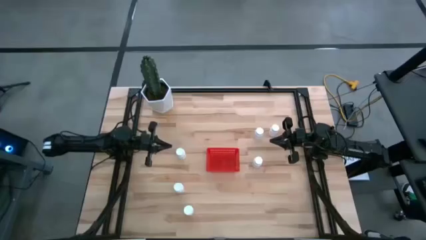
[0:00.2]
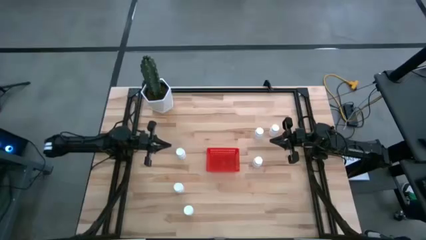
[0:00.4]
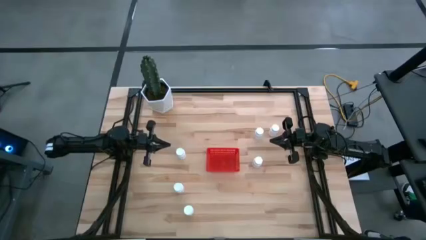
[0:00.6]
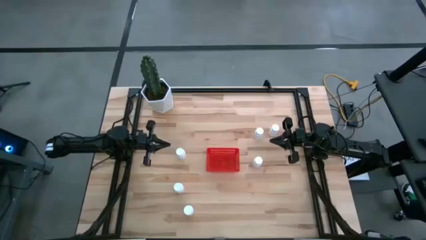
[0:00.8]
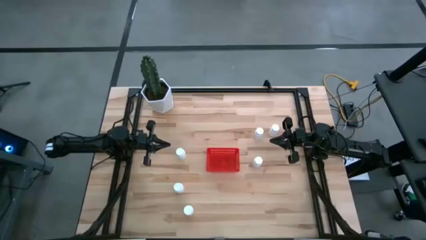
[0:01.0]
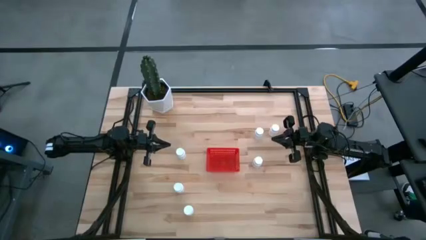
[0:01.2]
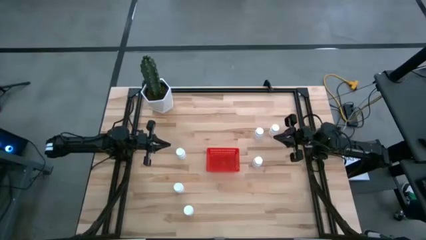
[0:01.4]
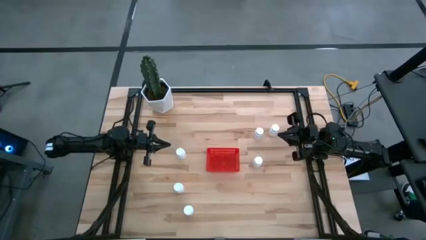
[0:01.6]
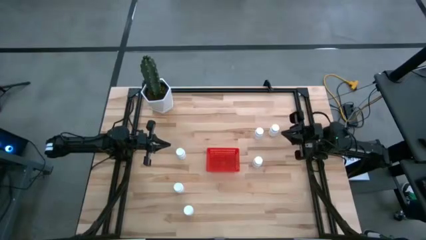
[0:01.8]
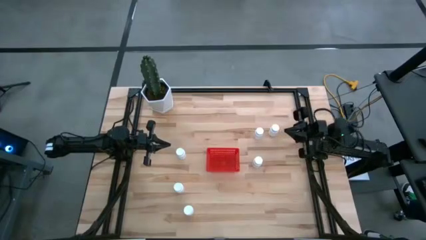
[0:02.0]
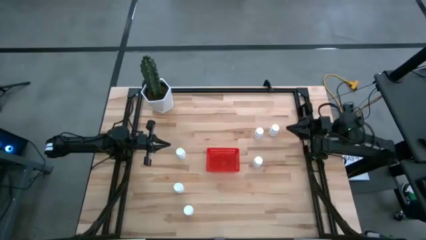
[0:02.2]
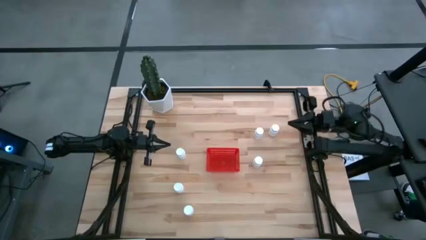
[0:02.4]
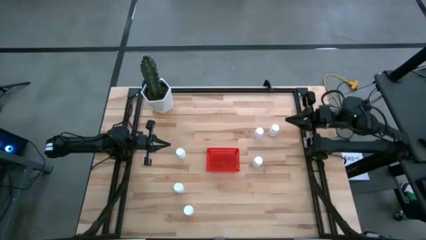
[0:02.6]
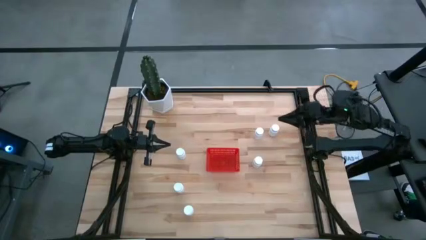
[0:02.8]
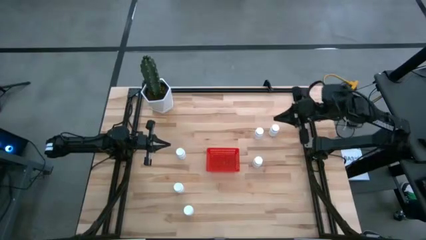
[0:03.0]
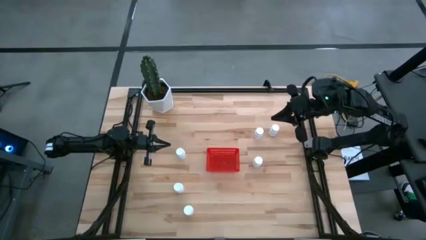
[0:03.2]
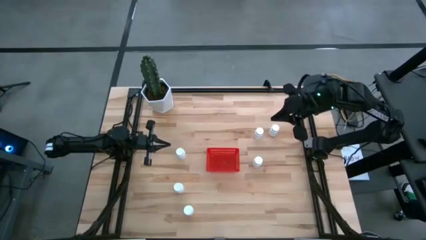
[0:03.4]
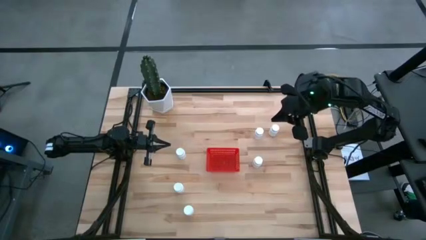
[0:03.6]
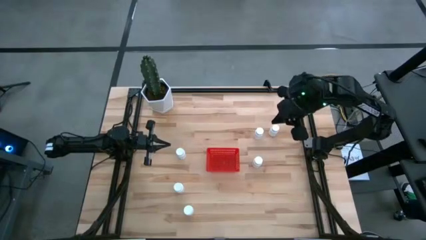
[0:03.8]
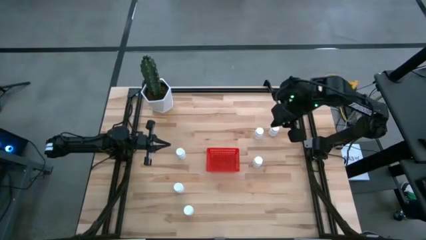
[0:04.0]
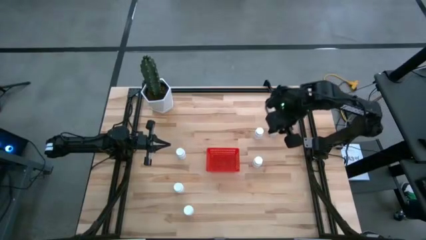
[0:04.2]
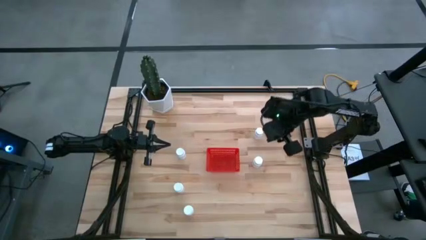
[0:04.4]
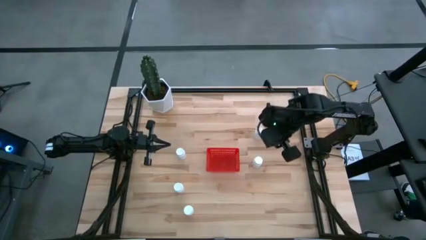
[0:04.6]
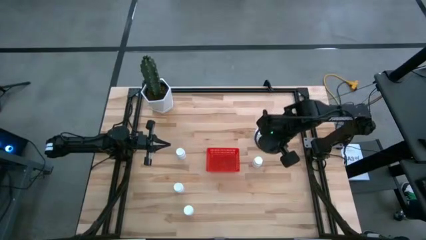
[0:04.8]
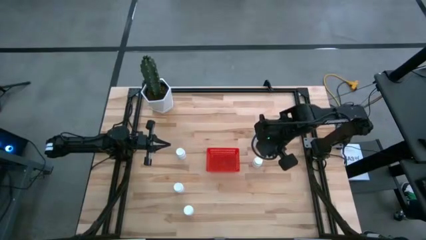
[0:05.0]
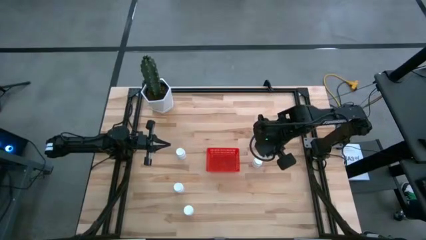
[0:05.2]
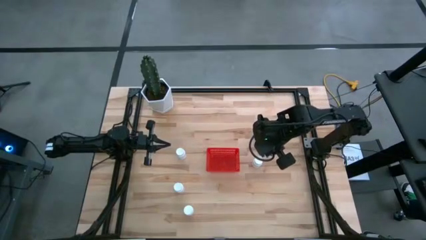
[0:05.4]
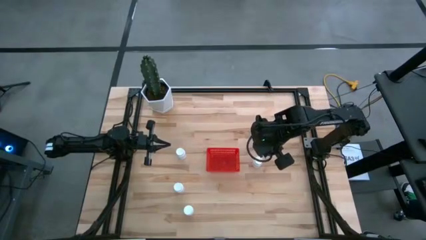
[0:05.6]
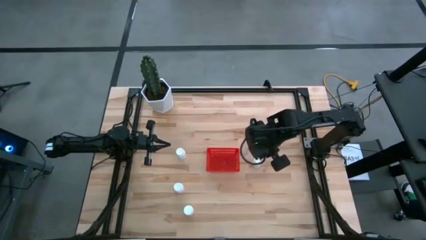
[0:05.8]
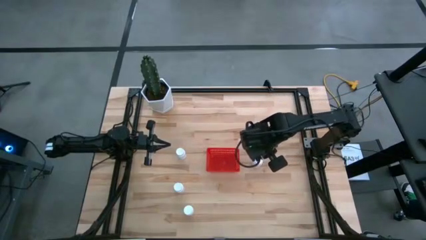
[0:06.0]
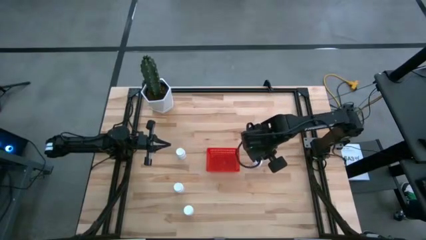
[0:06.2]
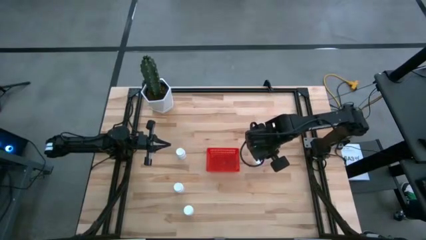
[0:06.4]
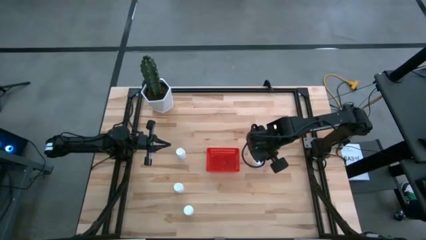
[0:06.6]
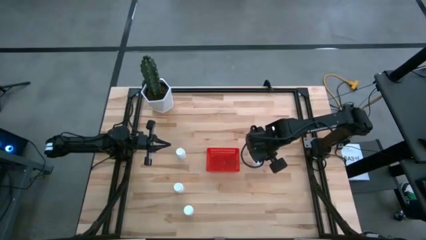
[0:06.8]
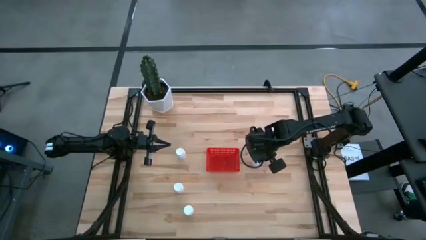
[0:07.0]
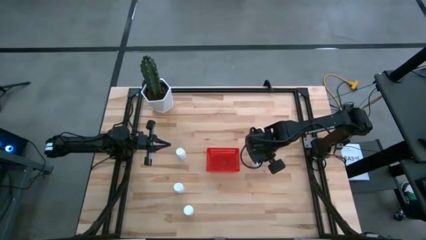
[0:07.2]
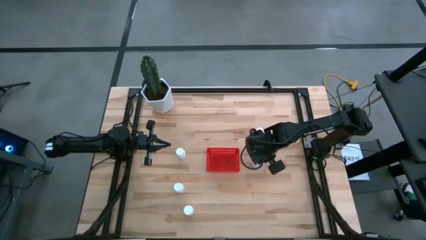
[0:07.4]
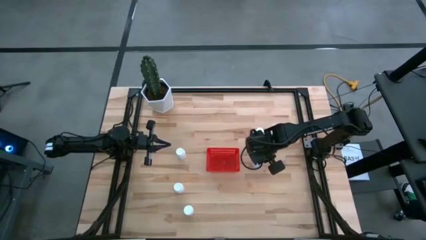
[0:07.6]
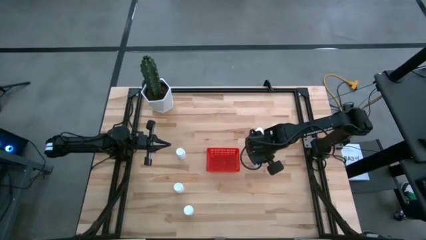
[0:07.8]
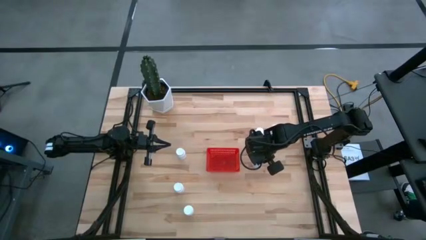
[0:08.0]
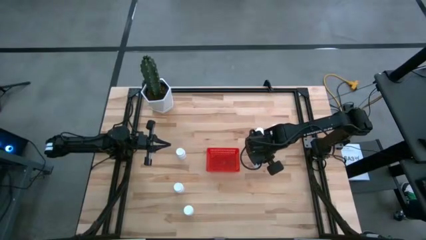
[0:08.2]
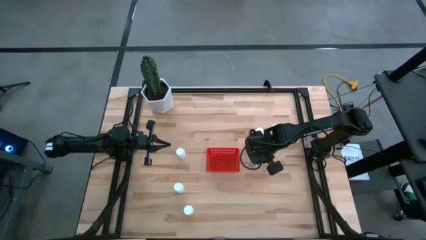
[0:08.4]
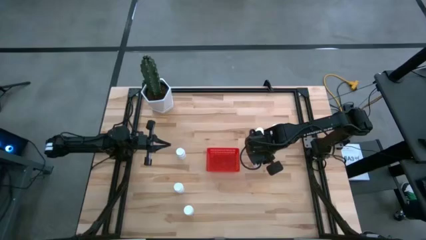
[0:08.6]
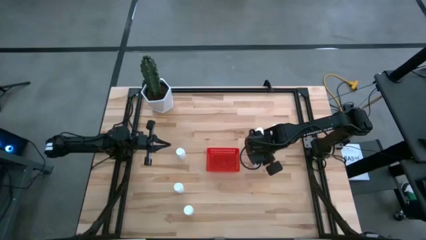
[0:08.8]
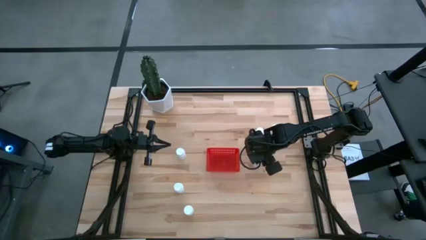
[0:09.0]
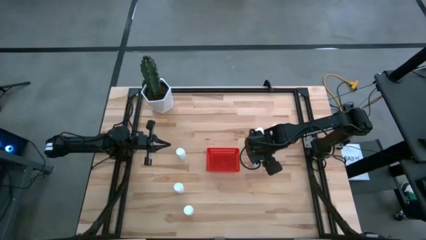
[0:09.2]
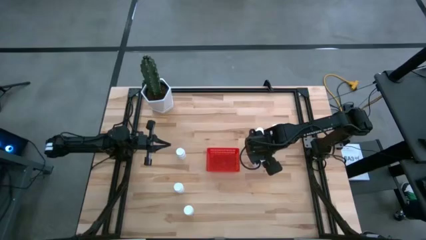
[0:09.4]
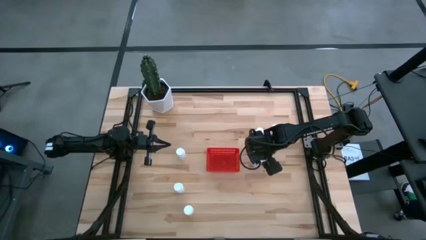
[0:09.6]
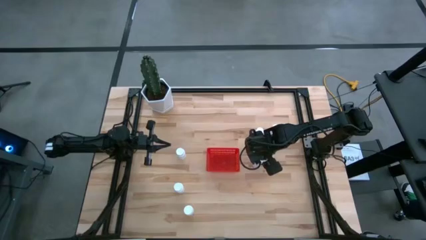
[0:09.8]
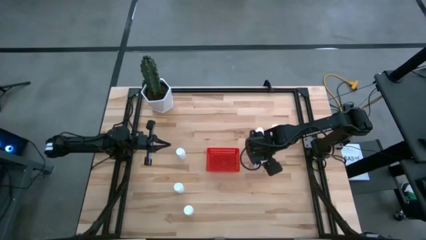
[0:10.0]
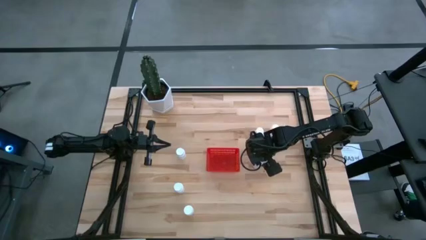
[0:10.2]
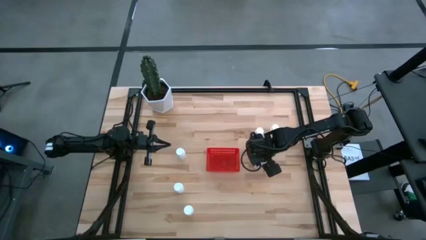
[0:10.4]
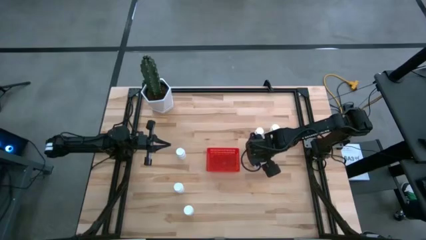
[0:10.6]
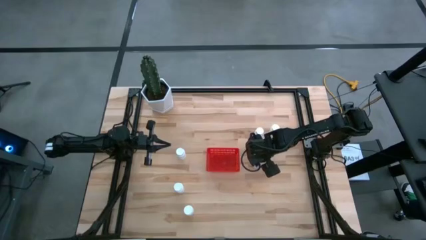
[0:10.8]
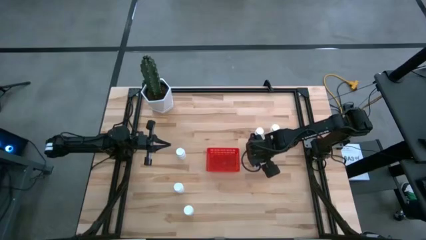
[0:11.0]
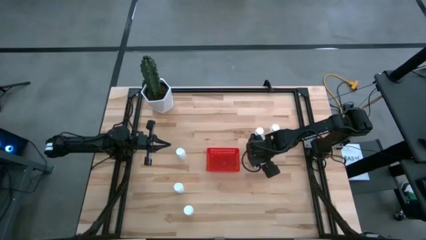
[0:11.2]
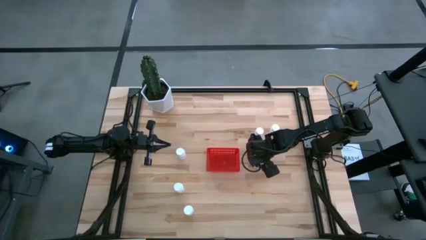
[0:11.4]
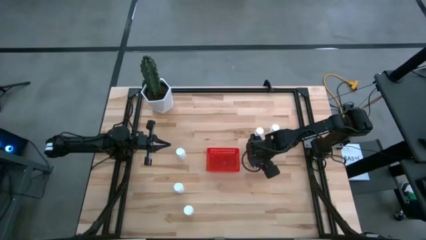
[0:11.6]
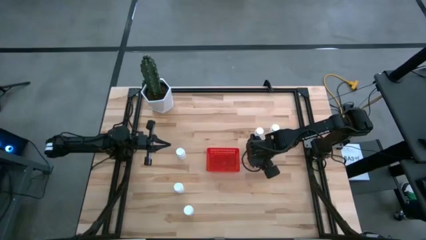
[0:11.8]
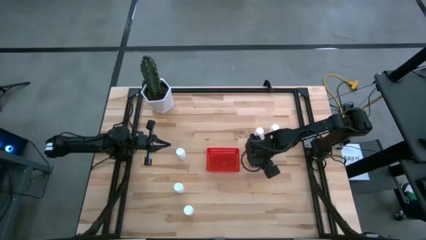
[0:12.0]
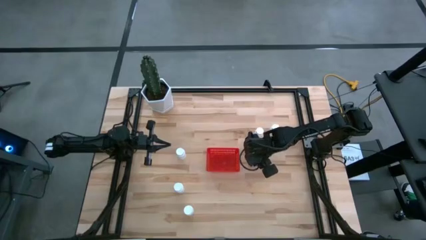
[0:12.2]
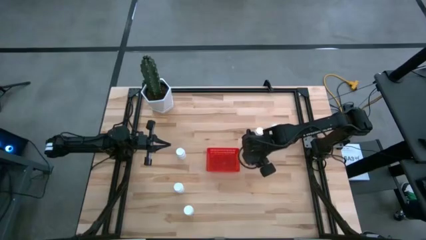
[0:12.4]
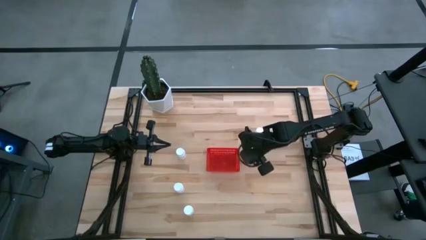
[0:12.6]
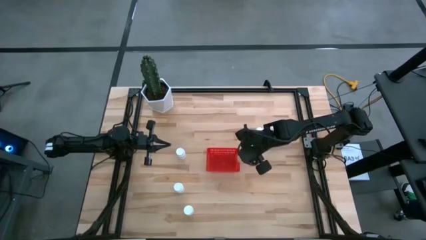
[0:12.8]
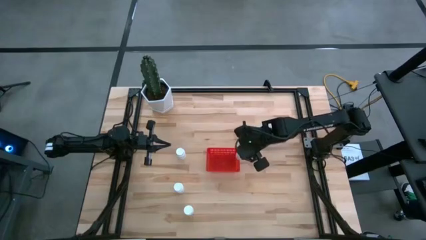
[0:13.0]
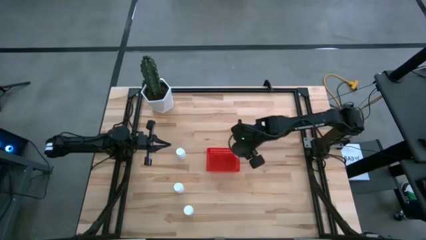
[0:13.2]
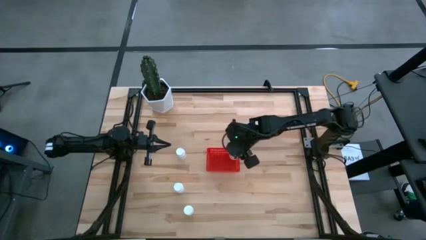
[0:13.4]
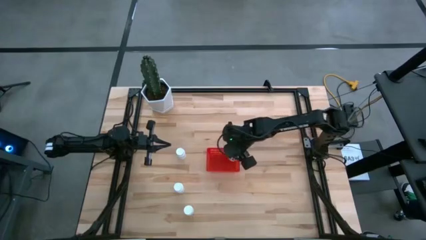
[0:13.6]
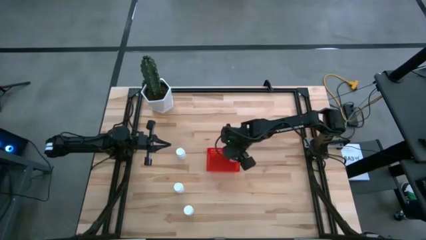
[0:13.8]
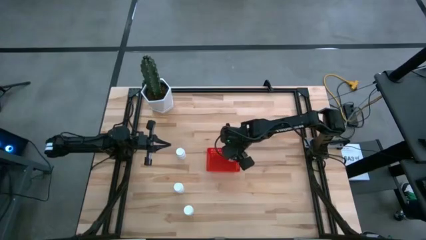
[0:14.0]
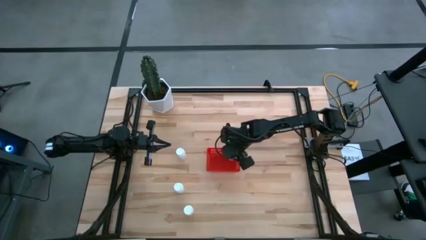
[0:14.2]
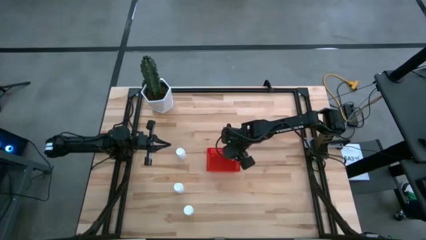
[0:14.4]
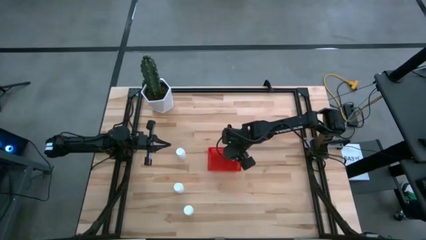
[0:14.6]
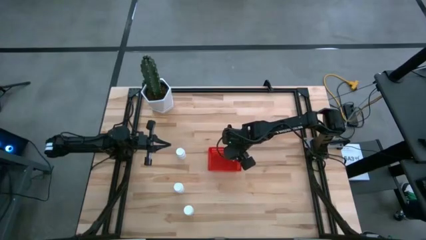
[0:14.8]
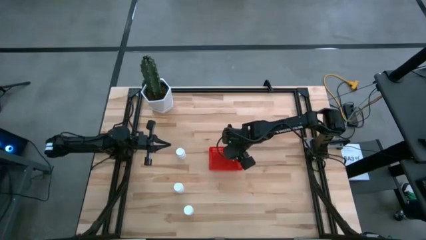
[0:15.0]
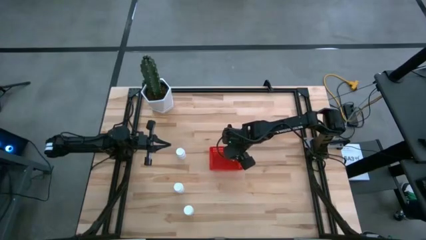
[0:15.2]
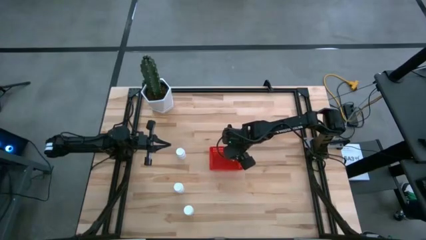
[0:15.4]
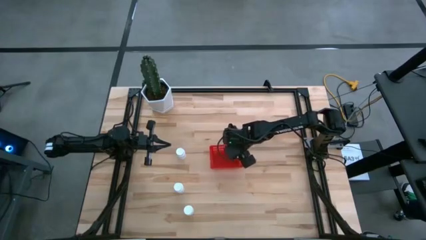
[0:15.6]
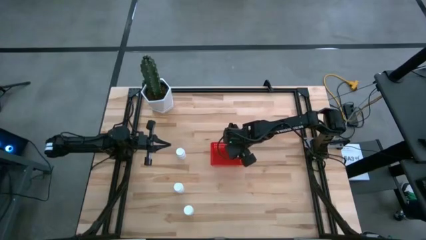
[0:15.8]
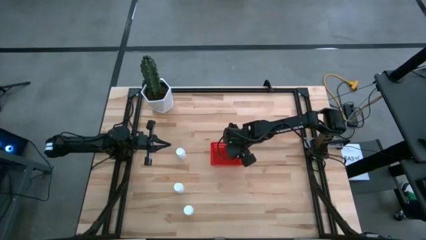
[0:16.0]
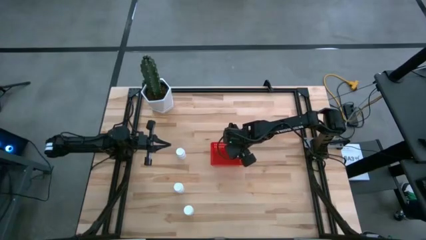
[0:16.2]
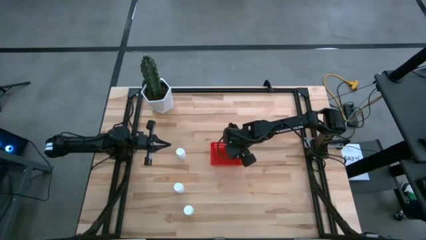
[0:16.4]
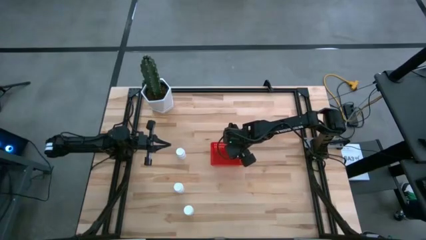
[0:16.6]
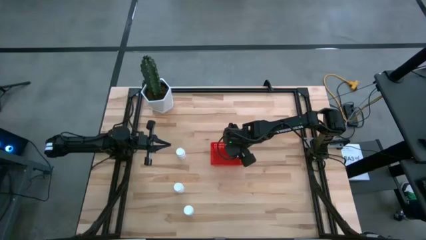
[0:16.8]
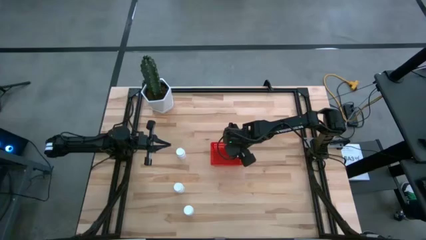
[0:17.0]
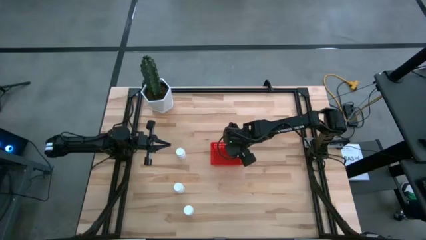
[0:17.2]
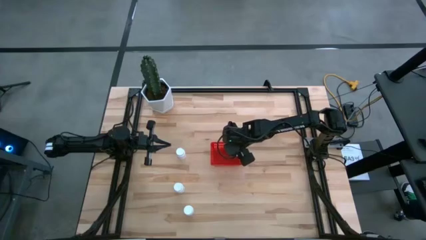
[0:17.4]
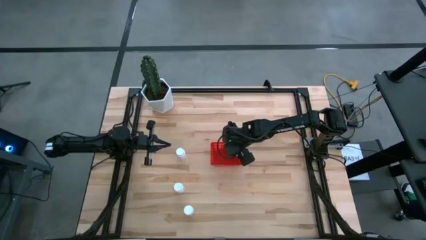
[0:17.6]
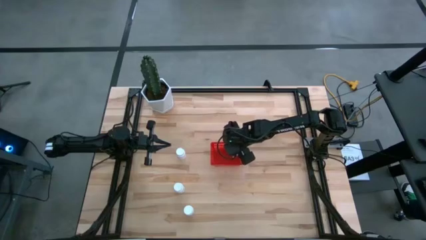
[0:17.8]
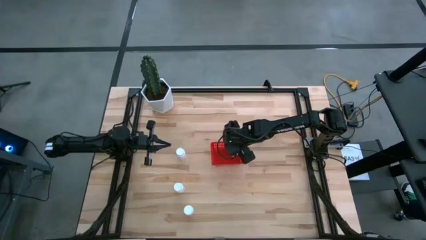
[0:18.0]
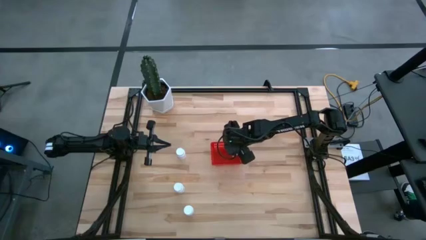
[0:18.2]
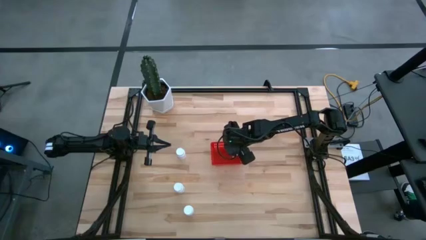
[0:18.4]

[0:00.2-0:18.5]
Task: Pick and place pill bottles into a basket
Put the white medicine bottle into the red basket
